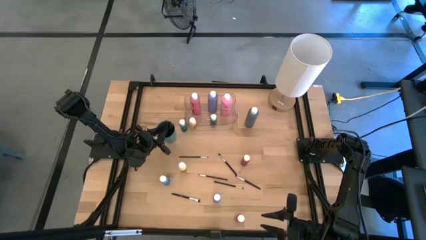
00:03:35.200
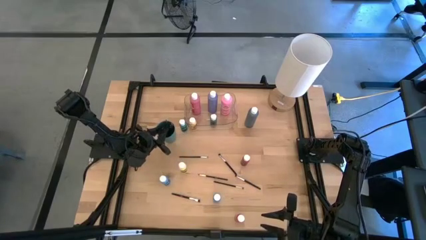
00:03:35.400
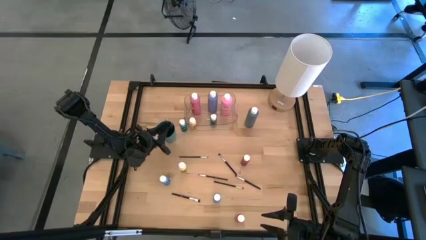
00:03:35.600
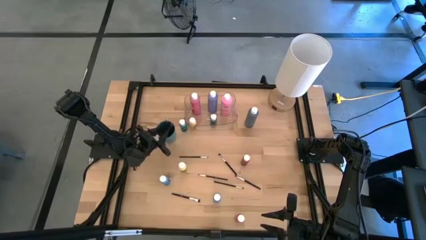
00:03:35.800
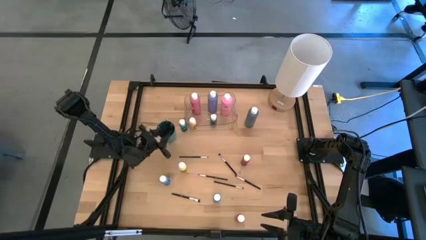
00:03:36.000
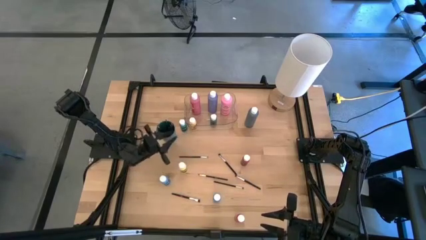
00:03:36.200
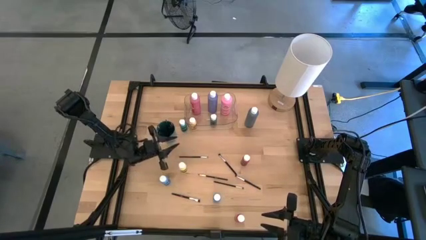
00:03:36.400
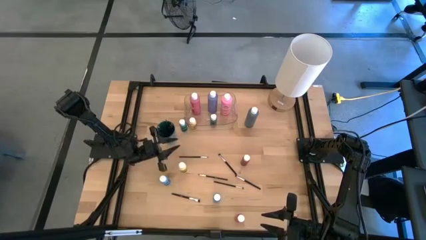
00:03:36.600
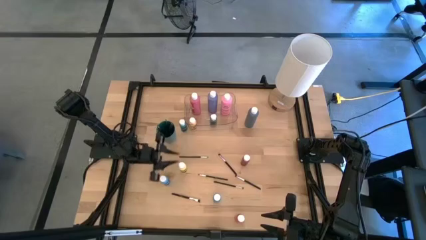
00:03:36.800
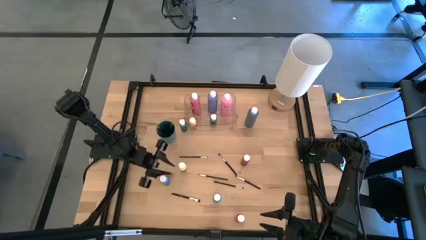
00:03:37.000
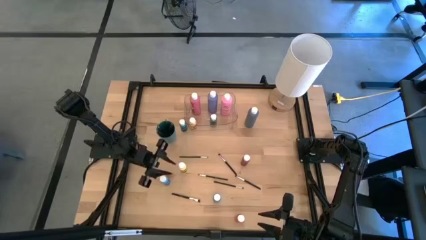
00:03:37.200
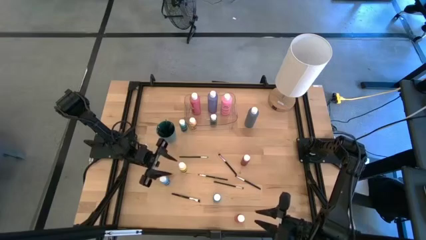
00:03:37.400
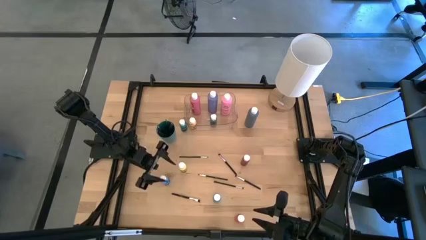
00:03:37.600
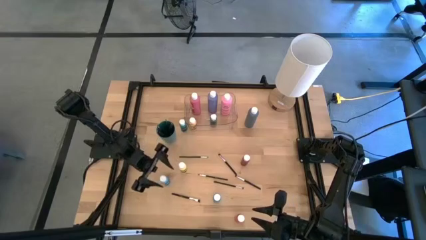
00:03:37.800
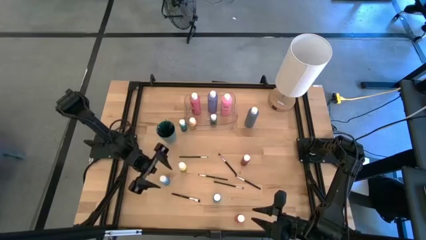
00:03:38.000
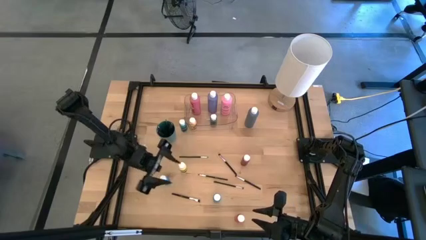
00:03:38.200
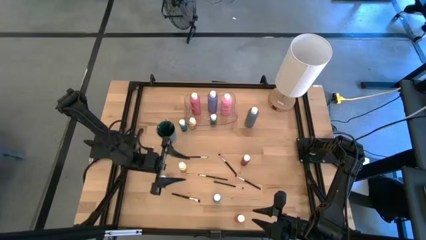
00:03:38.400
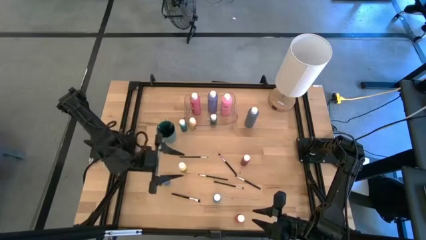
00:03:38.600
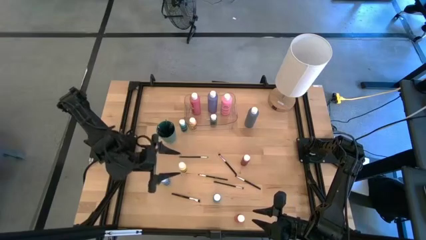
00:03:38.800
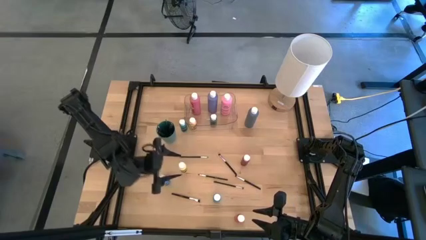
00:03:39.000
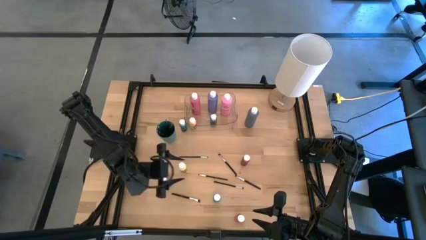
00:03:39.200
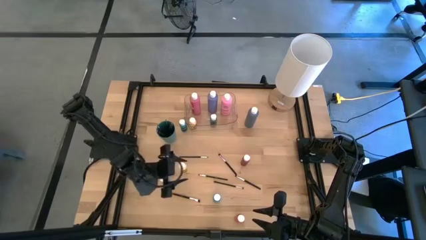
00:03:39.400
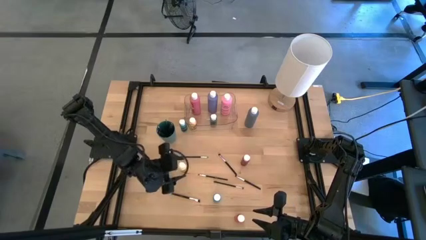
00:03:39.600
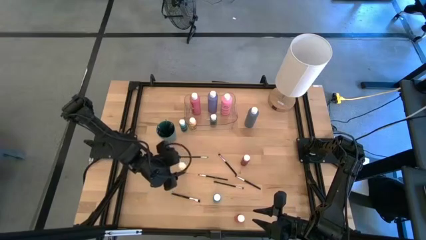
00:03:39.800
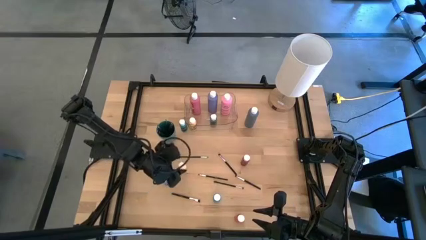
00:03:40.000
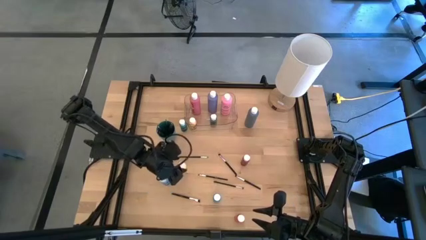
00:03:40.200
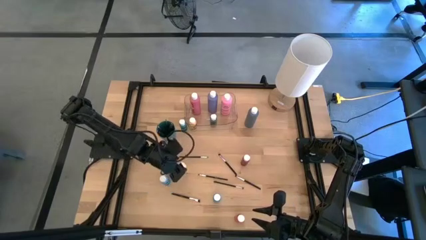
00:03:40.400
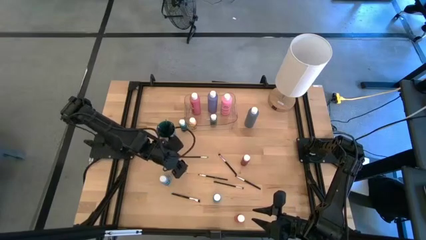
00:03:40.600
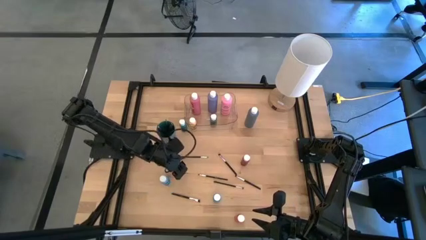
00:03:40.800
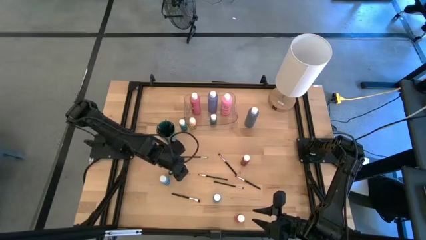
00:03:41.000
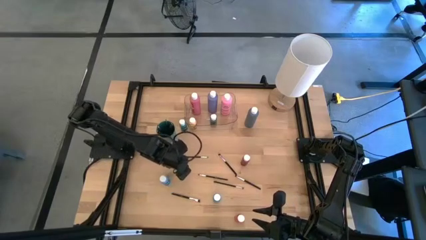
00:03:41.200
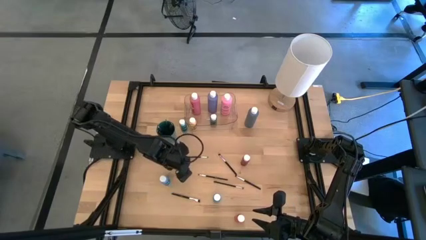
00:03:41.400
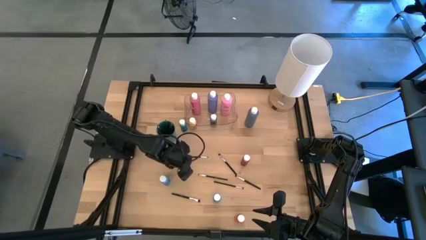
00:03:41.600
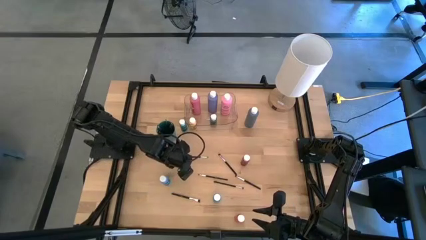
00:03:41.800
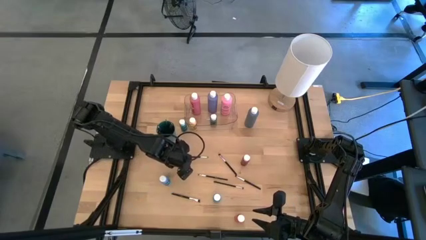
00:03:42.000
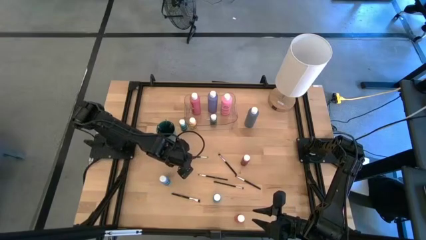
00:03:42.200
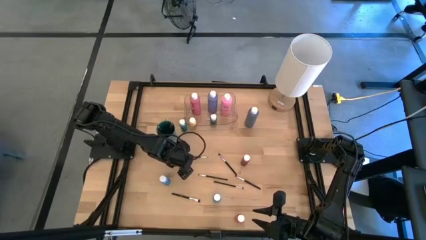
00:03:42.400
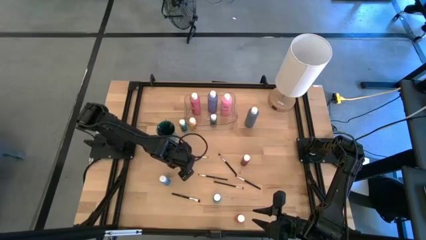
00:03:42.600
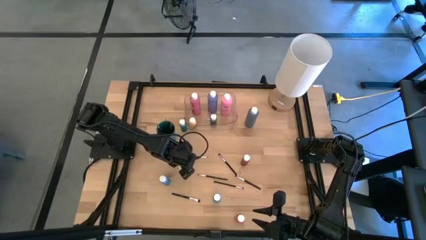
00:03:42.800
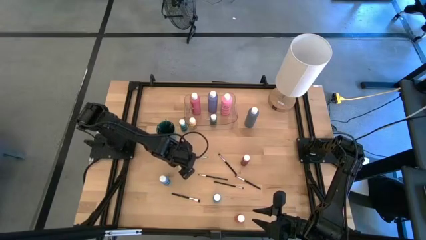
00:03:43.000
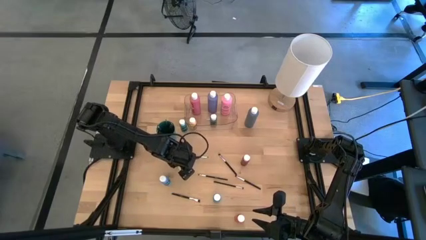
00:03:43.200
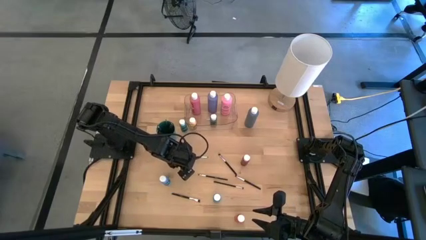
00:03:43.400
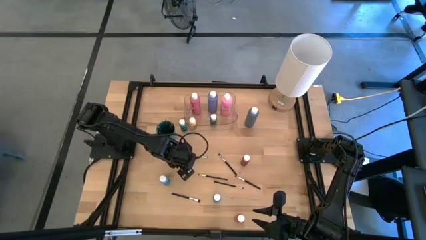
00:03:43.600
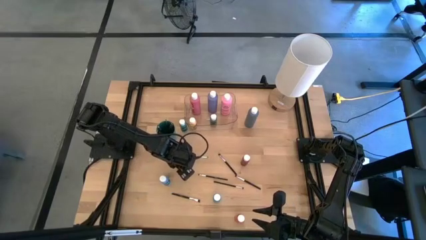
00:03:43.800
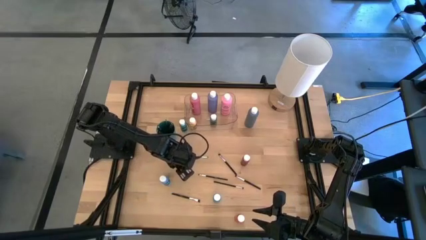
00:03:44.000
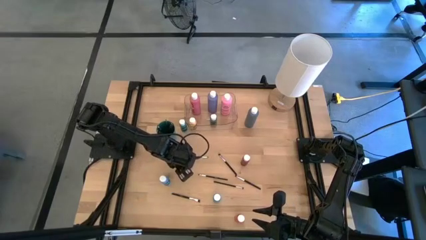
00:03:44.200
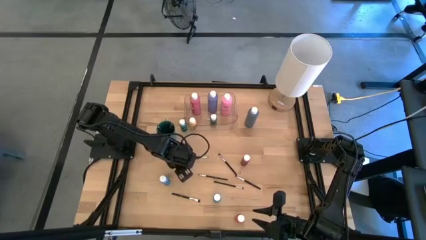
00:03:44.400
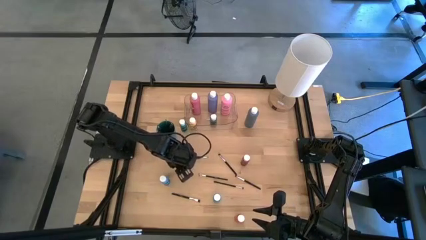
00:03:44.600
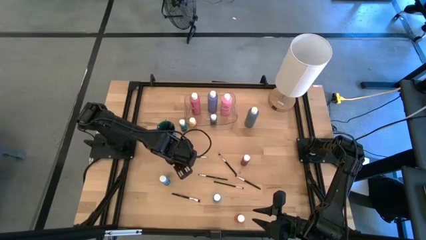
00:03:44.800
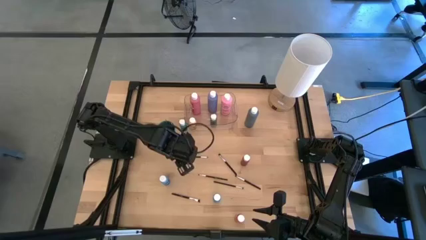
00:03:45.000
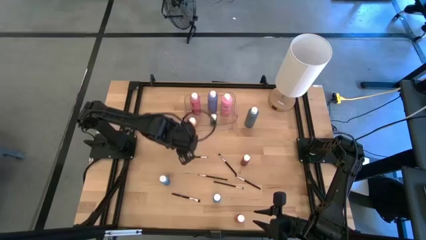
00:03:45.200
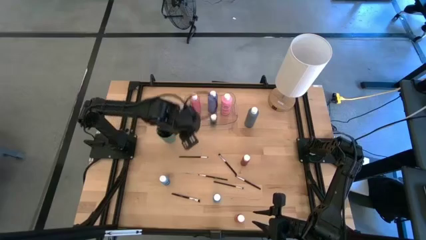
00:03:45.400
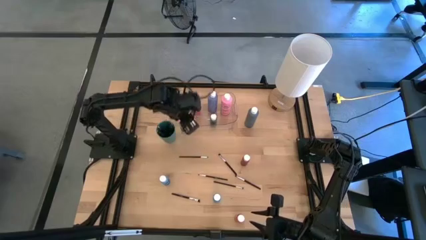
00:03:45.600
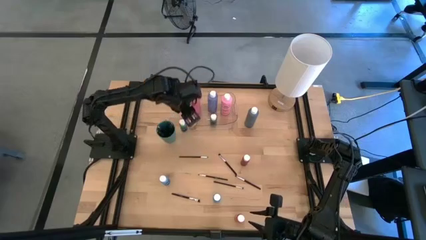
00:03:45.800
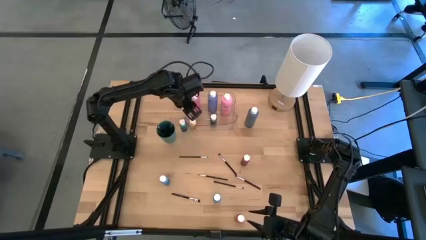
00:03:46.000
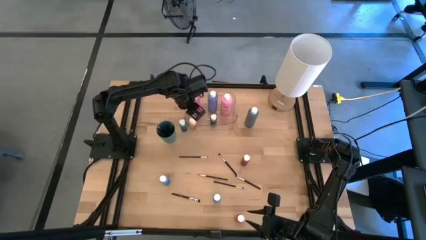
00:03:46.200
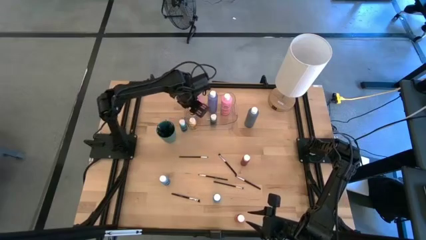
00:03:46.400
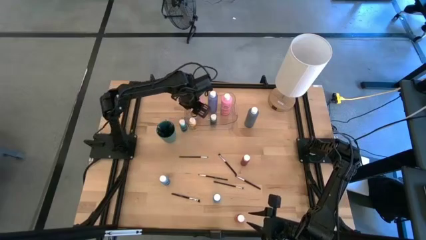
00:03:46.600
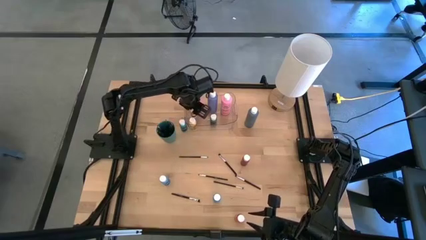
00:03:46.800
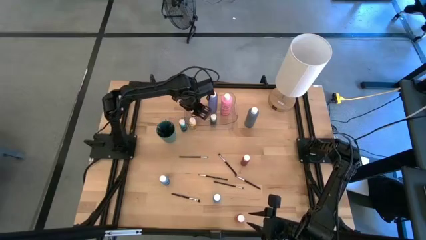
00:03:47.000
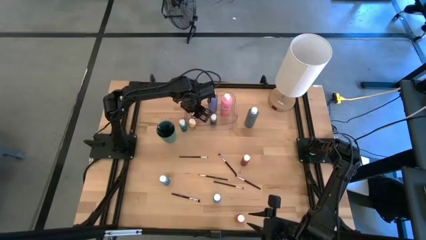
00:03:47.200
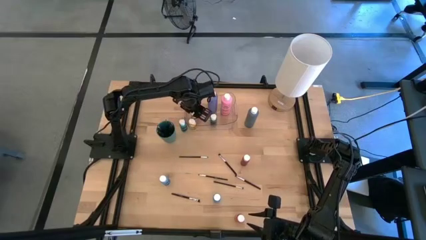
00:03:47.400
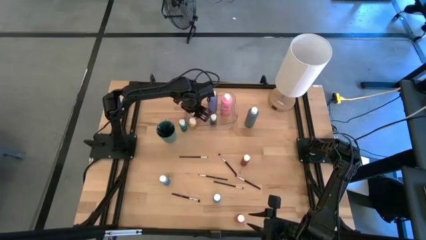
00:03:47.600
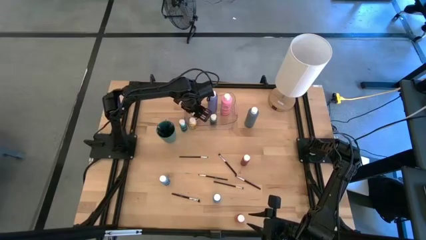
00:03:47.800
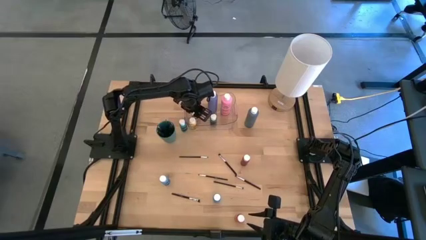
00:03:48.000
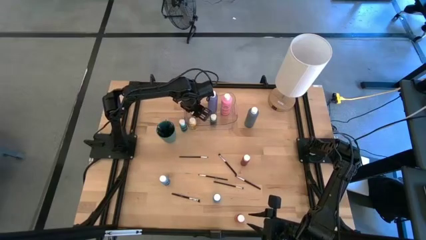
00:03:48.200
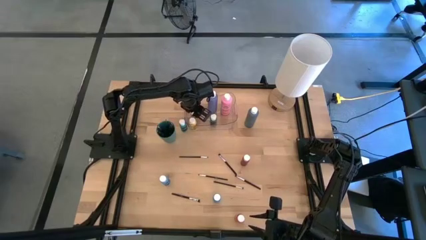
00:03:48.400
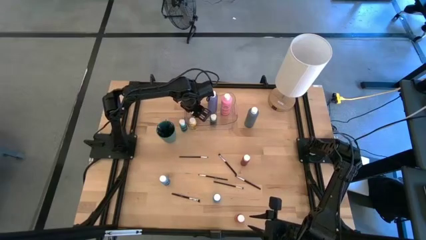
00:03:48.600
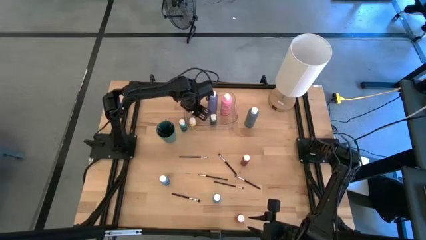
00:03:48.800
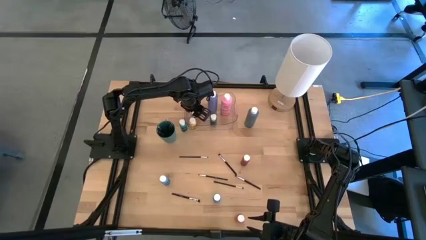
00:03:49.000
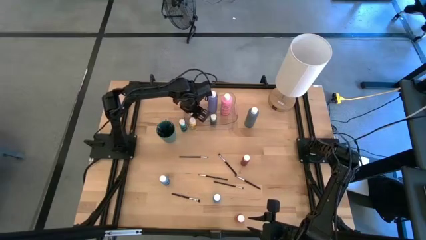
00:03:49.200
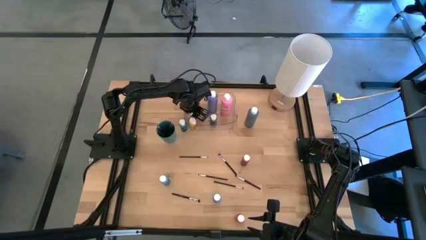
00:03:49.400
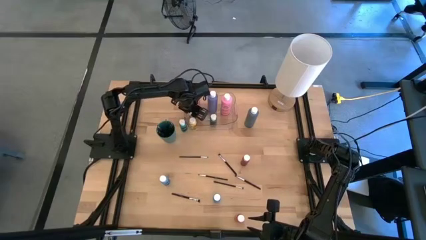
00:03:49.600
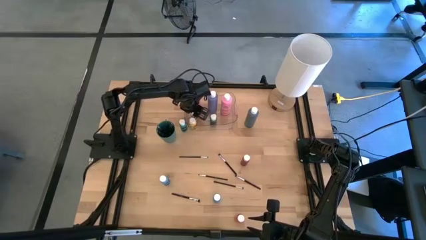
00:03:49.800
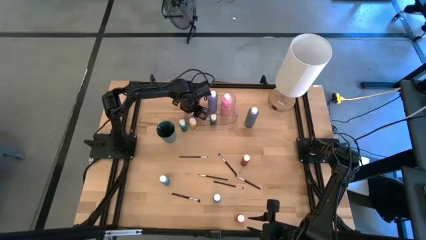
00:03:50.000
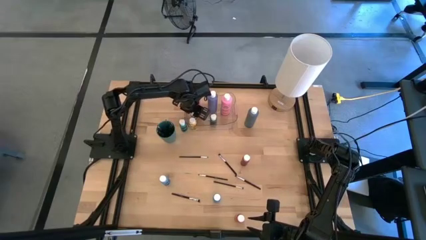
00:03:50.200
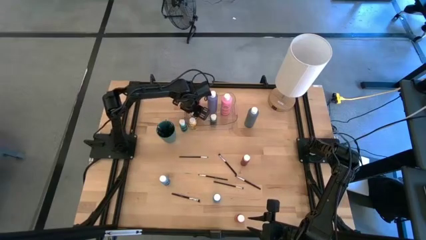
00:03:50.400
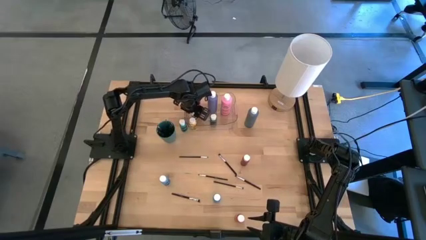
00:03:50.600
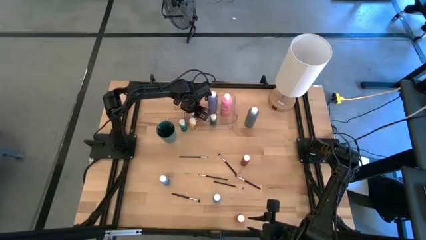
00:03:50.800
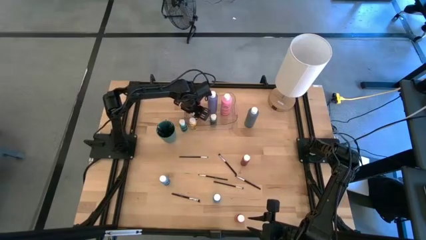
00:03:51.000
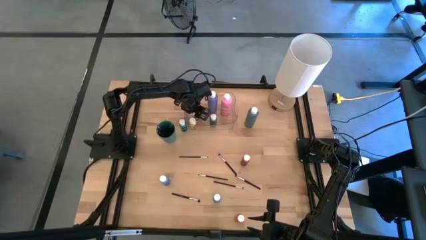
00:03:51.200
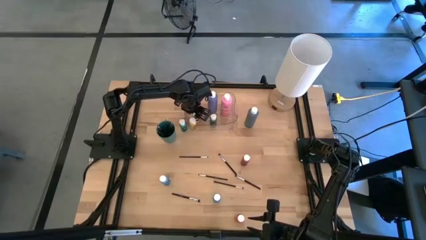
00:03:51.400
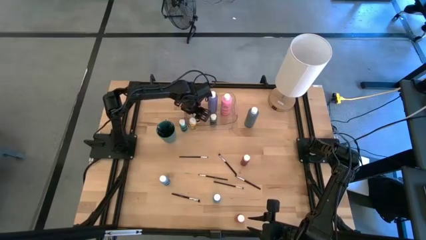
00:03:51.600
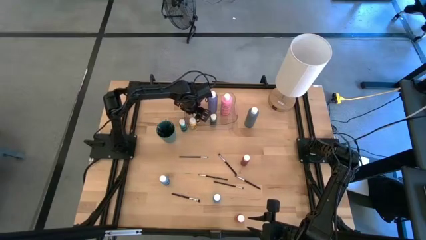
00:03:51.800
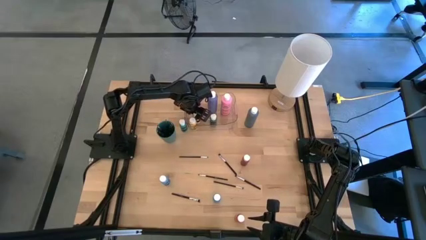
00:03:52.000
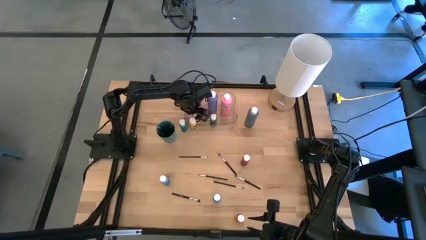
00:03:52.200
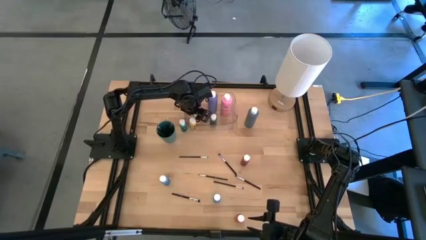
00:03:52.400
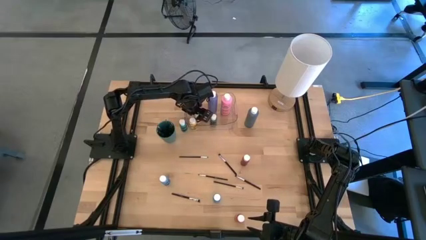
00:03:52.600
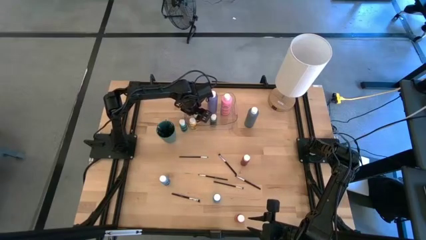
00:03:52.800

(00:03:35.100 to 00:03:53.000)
Task: Pick & Place Paint Supplies
Put the light yellow paint bottle into the transparent bin
